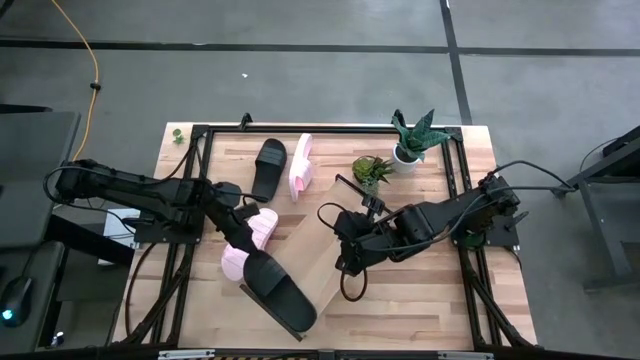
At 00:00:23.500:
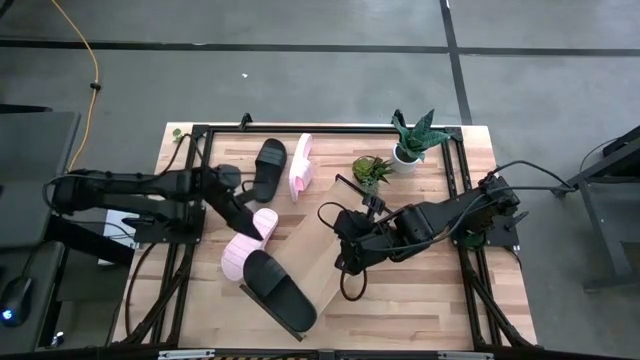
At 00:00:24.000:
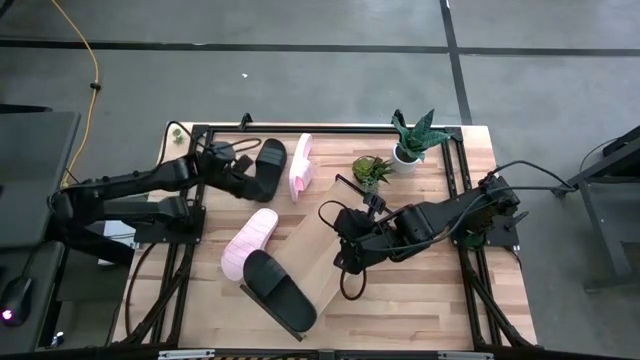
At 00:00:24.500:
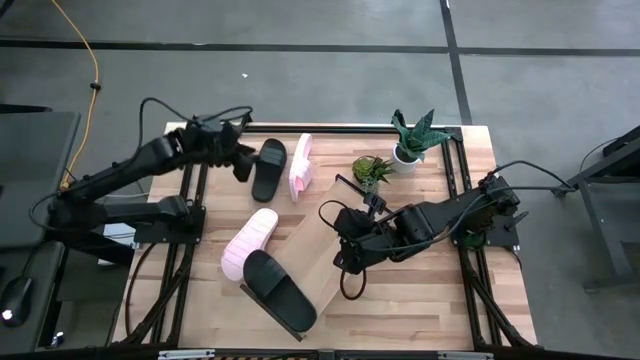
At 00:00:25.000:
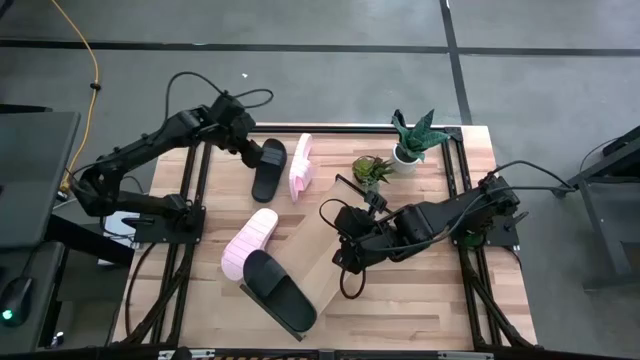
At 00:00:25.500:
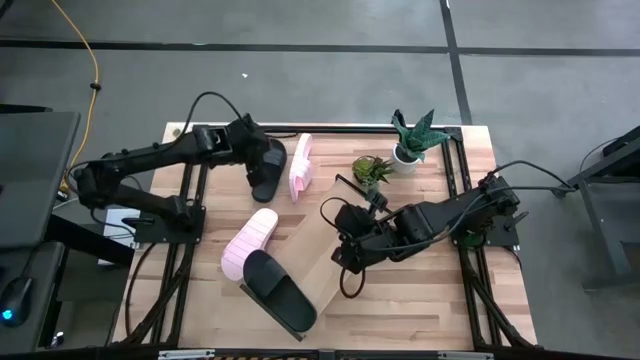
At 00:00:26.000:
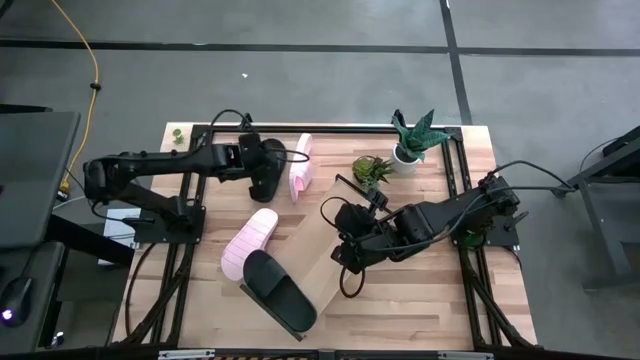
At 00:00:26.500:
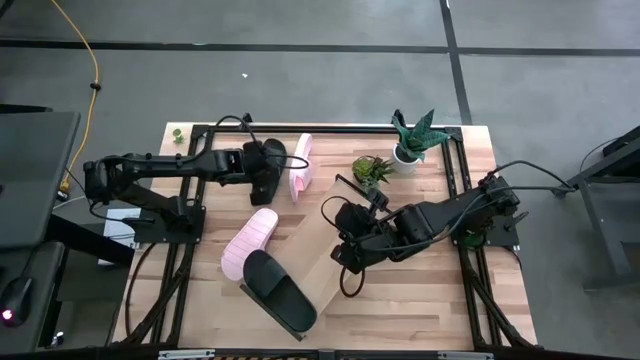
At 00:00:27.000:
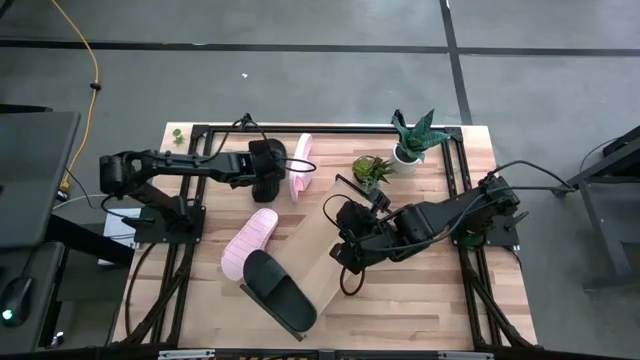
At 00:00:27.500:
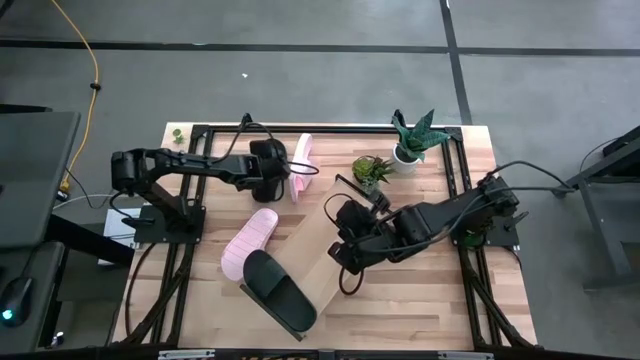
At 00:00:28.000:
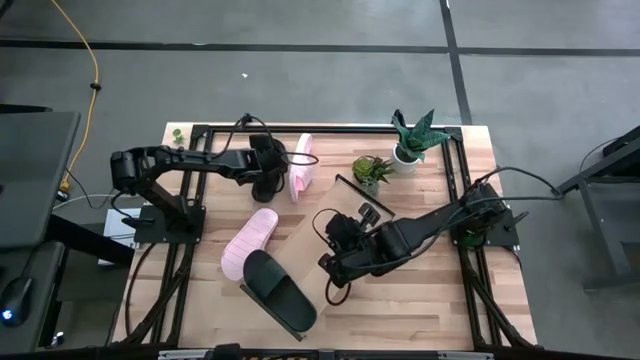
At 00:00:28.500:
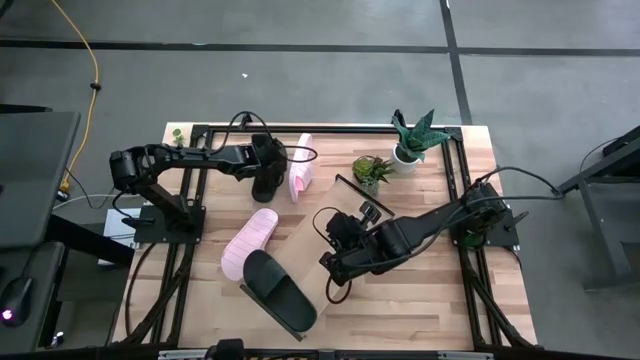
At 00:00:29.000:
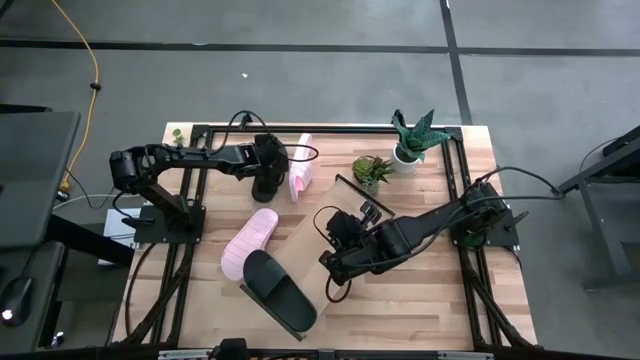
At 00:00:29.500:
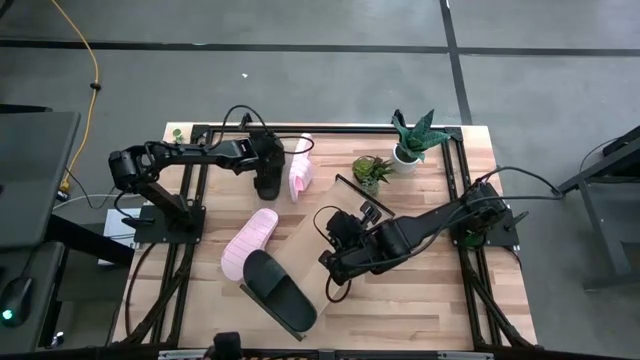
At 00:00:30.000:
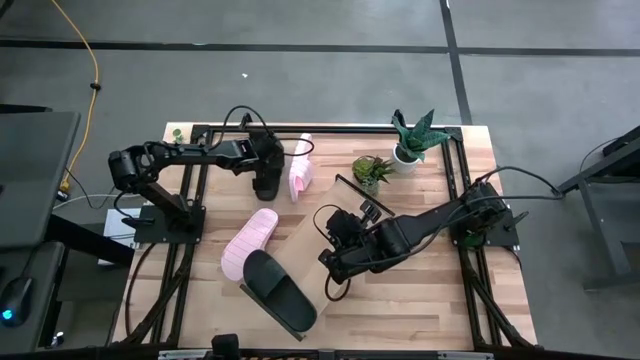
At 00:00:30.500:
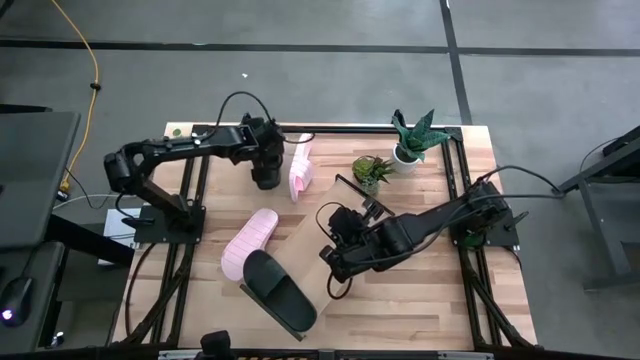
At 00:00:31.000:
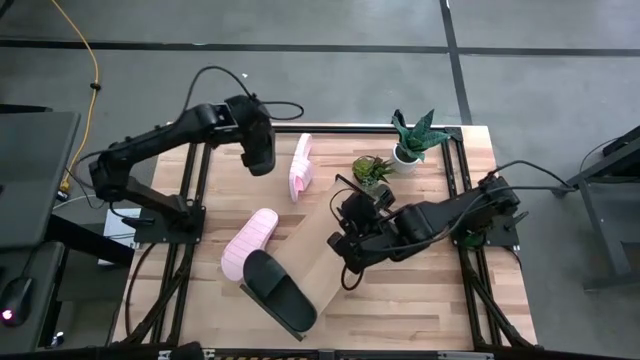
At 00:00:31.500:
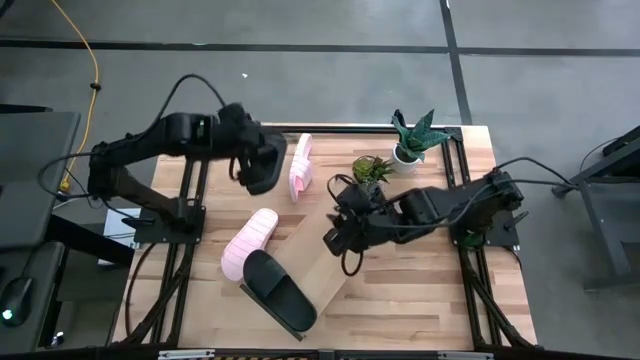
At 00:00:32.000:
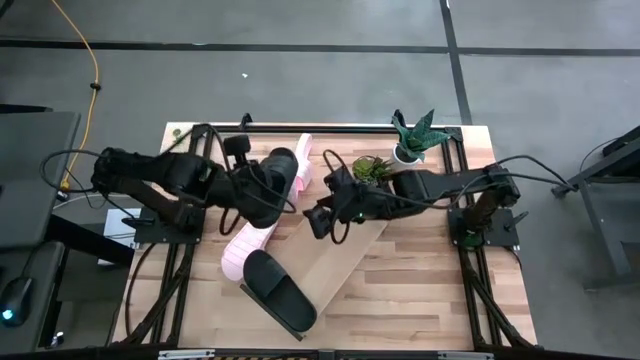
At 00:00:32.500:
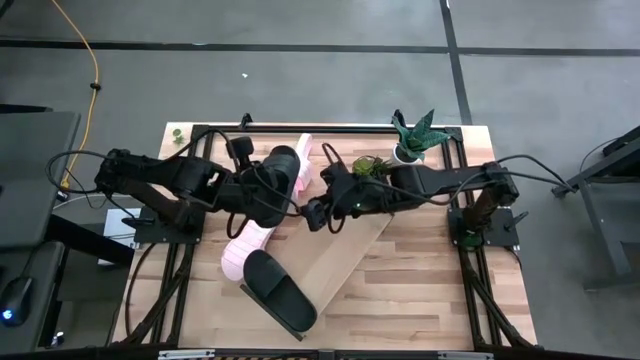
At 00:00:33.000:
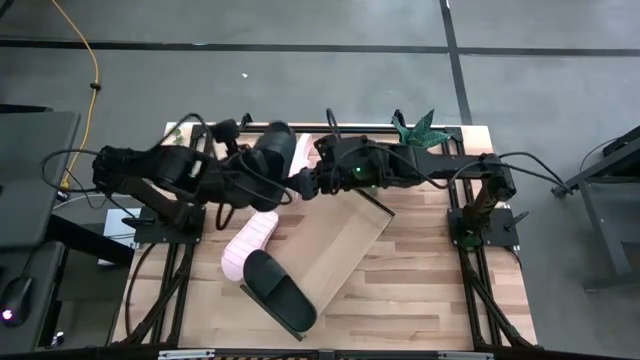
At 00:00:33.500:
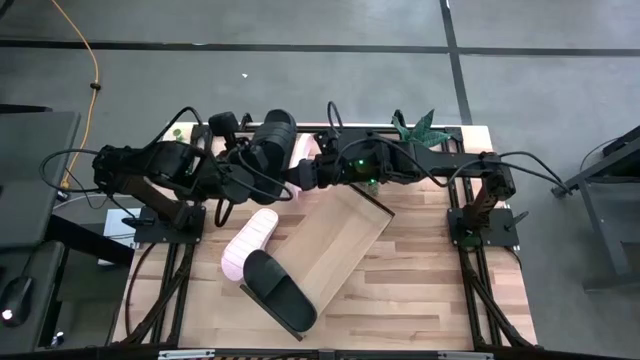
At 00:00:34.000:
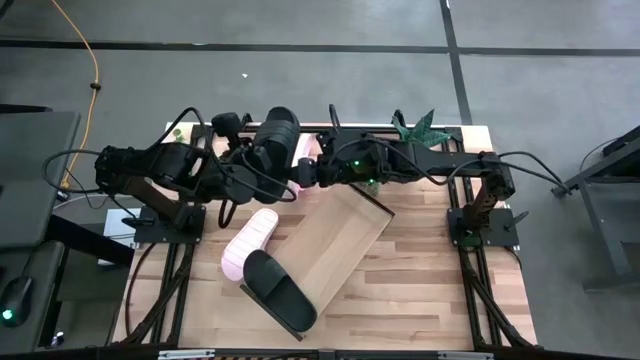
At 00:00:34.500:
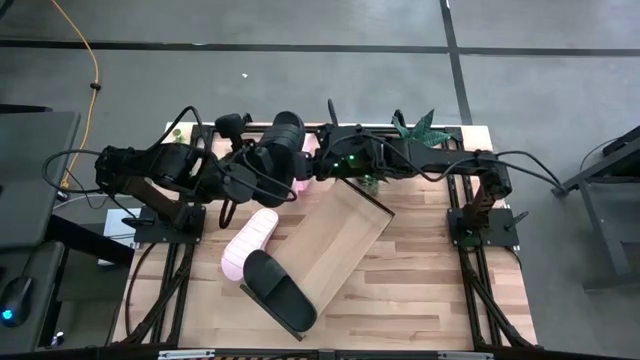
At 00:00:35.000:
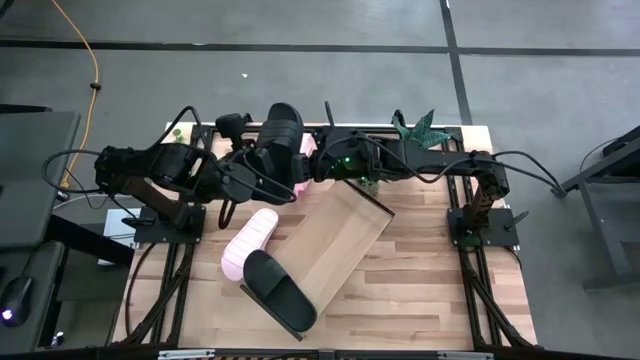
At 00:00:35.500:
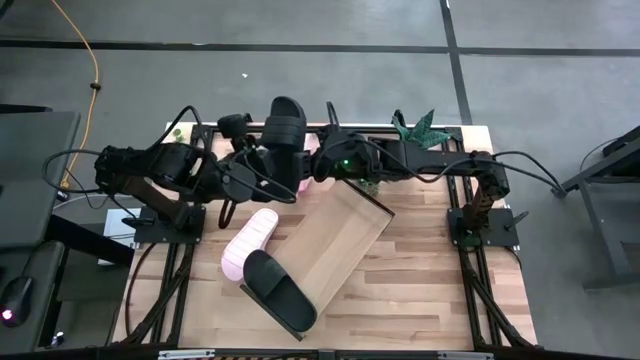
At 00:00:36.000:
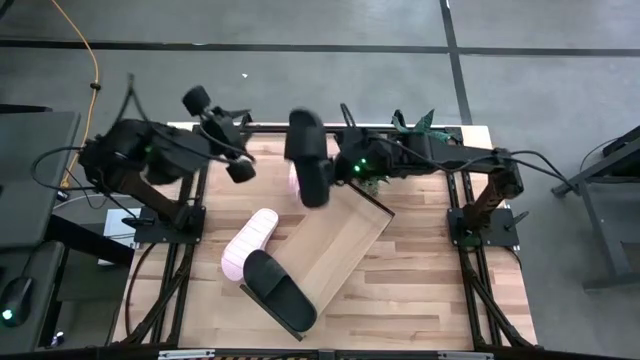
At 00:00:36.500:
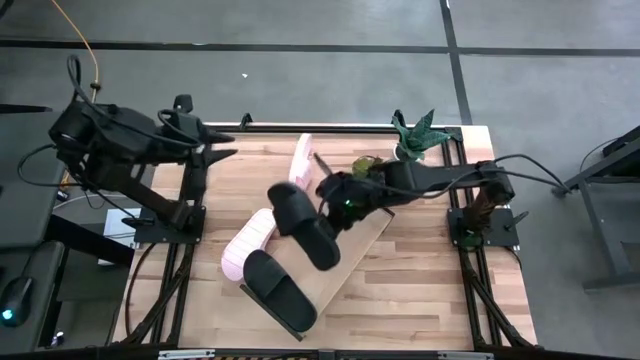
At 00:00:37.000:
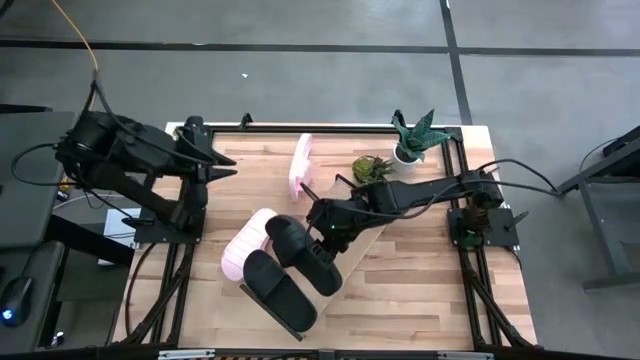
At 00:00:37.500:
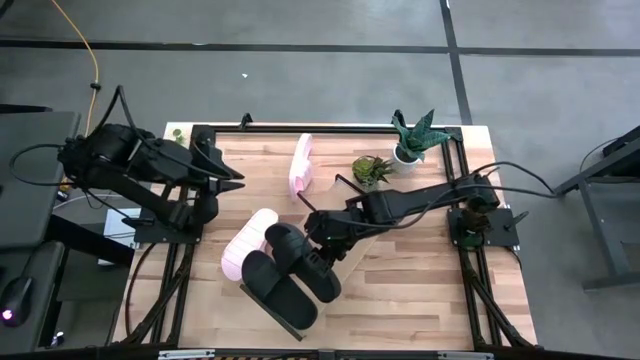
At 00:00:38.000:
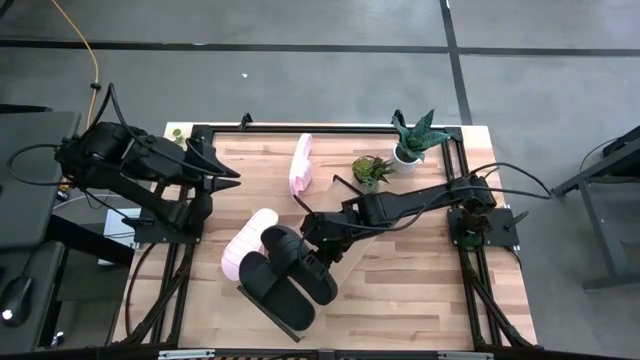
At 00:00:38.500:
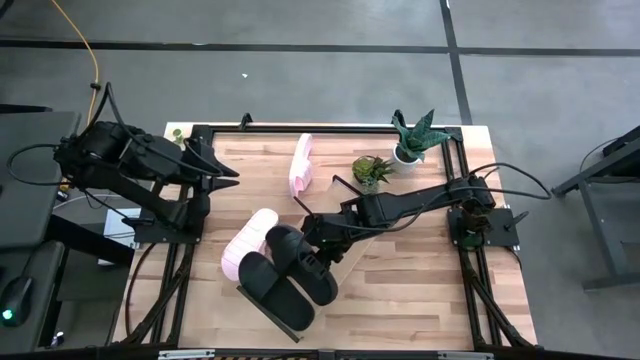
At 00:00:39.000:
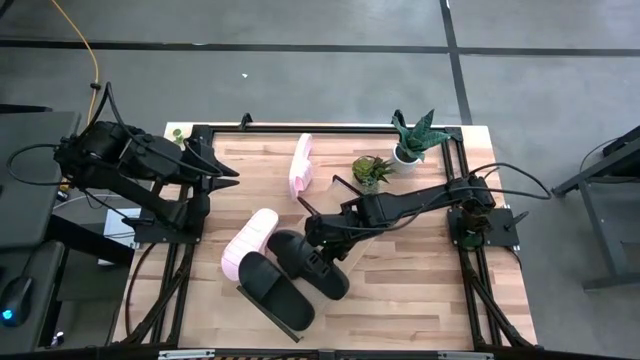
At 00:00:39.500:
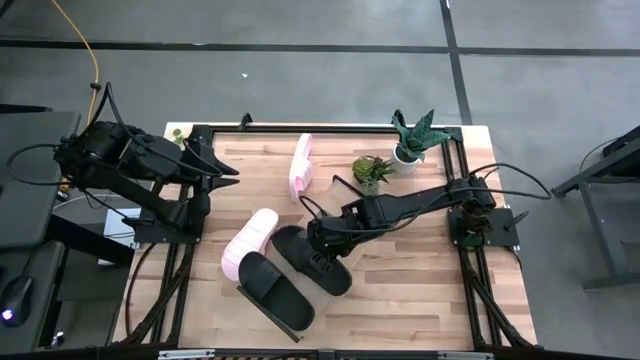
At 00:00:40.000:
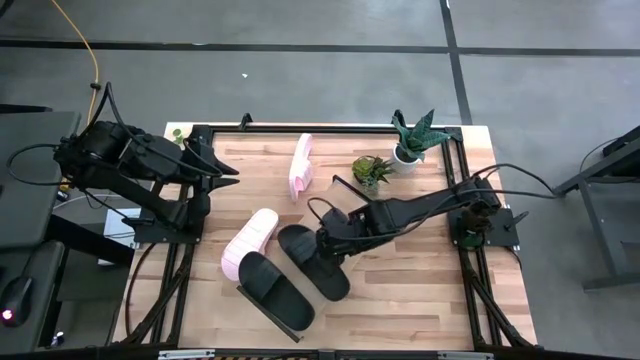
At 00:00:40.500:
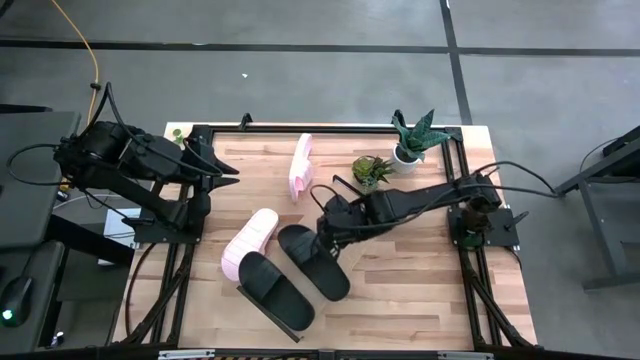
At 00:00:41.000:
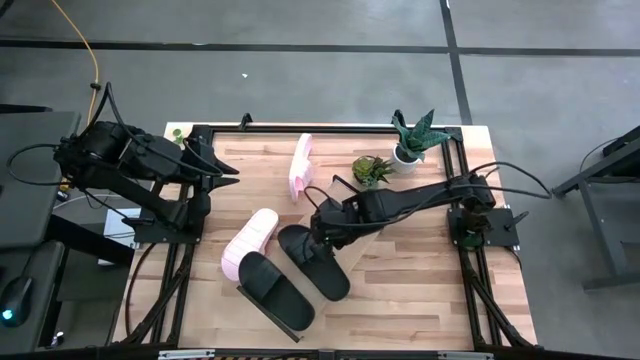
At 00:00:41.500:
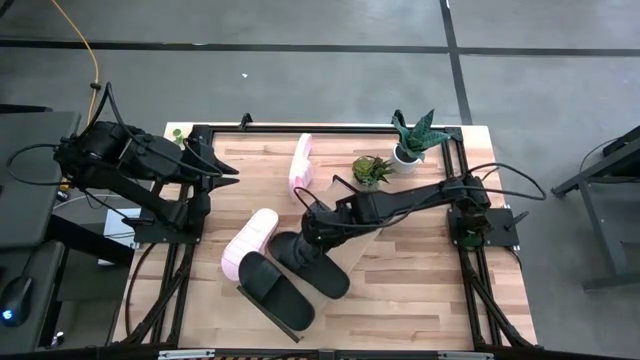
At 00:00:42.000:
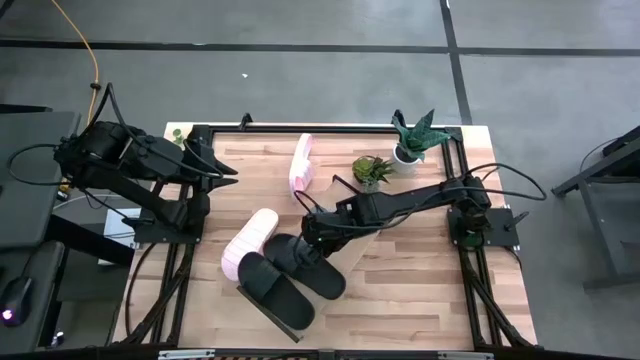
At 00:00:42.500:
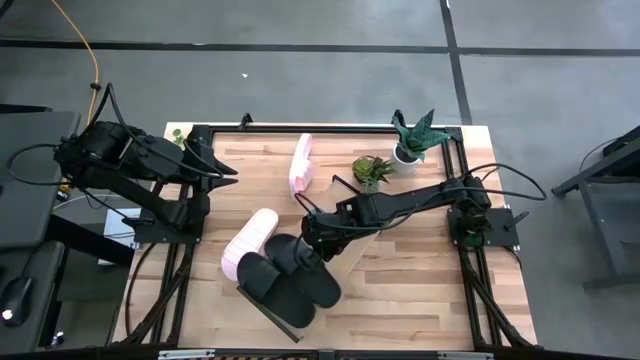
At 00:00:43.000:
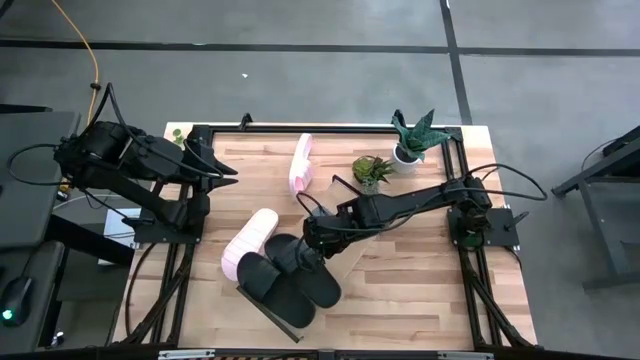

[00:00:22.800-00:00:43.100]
Task: Pick and place slides into the shelf
Put the black slide on the shelf
